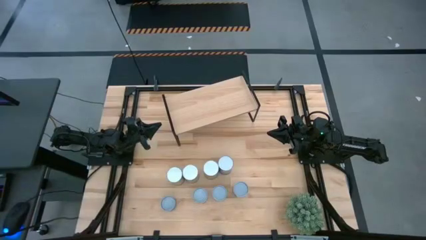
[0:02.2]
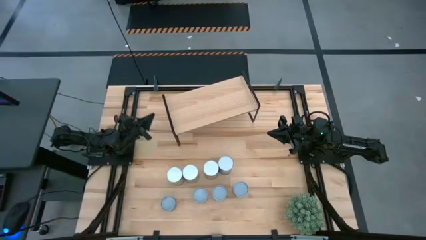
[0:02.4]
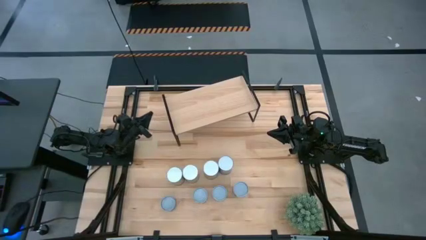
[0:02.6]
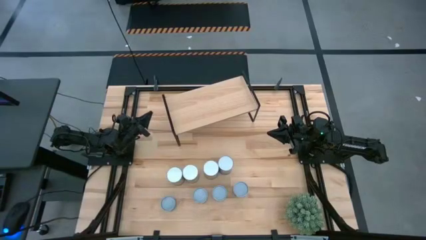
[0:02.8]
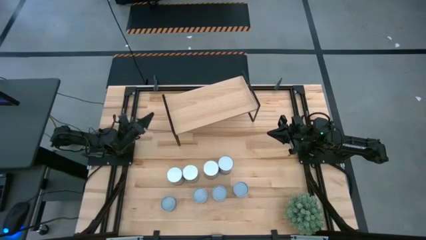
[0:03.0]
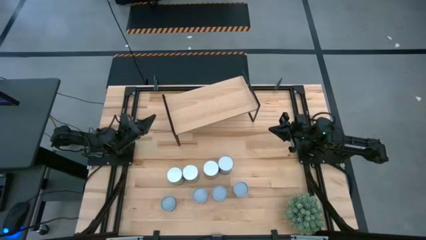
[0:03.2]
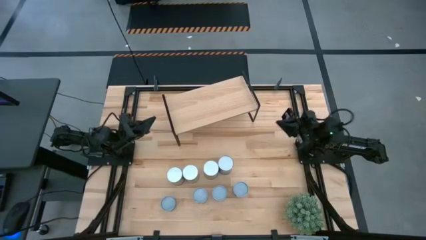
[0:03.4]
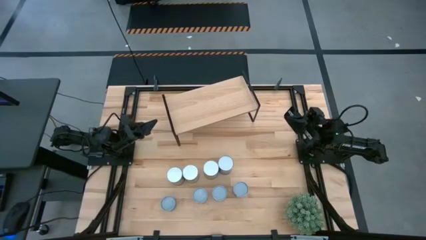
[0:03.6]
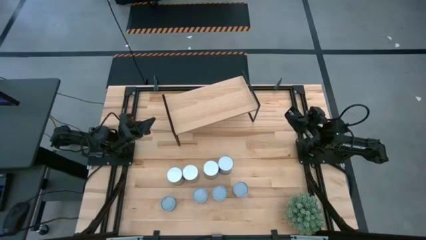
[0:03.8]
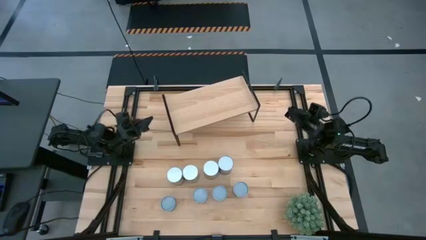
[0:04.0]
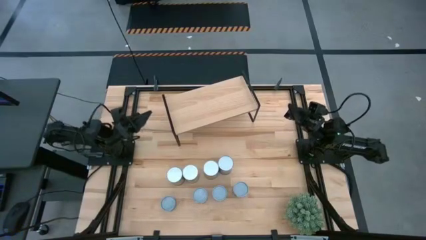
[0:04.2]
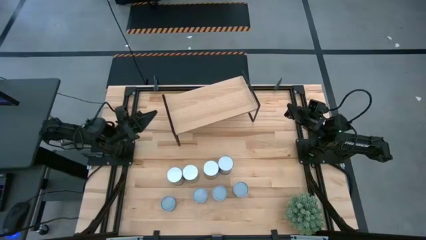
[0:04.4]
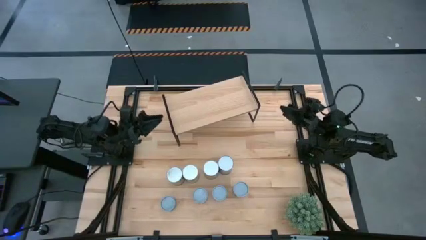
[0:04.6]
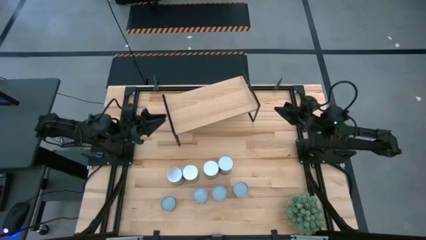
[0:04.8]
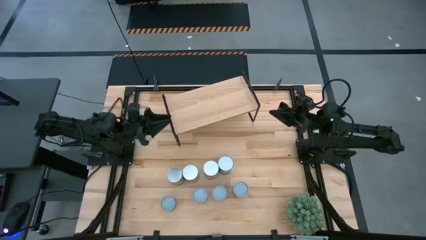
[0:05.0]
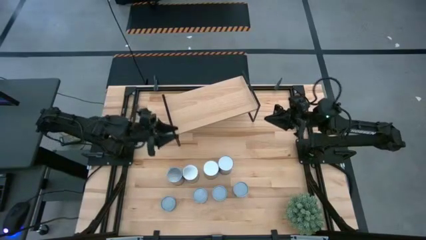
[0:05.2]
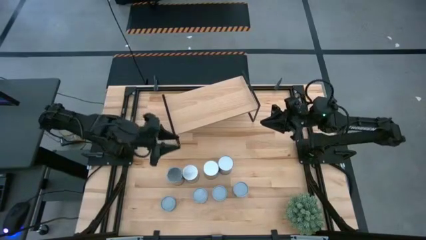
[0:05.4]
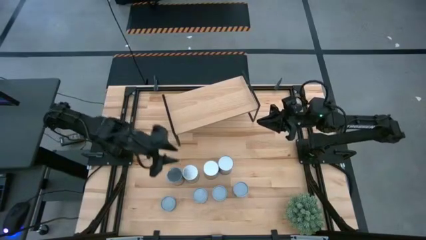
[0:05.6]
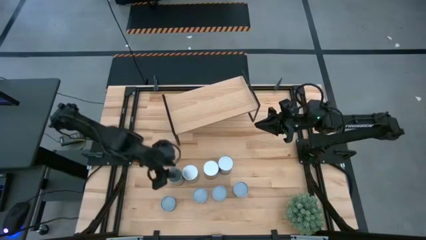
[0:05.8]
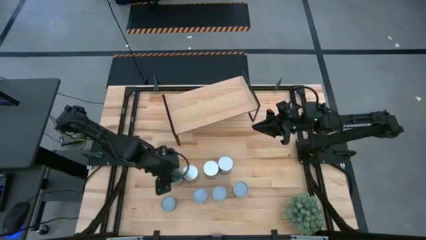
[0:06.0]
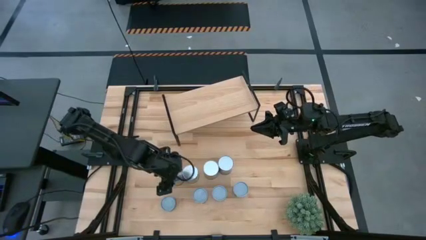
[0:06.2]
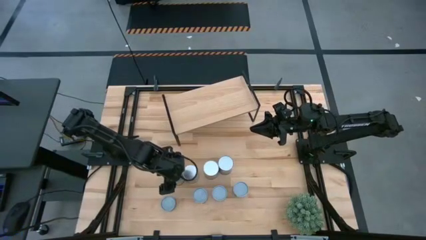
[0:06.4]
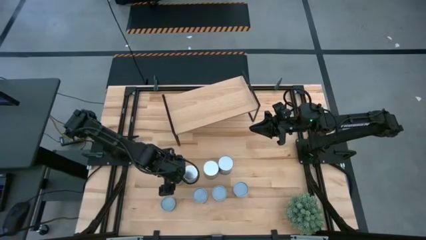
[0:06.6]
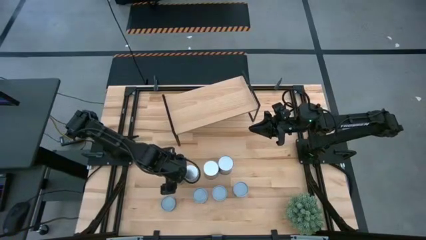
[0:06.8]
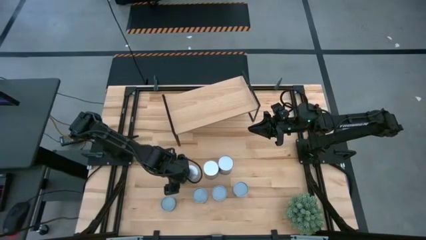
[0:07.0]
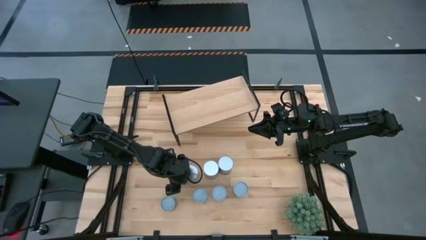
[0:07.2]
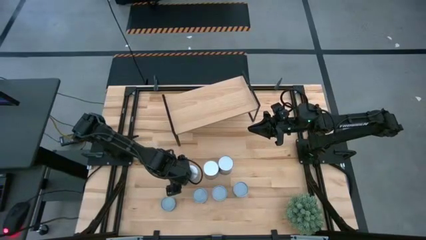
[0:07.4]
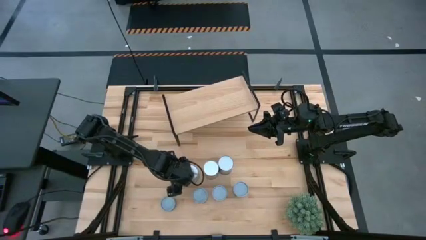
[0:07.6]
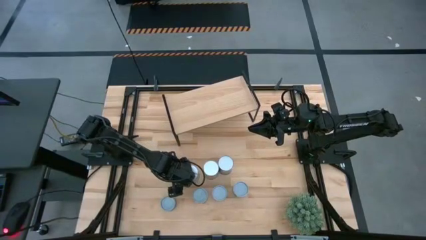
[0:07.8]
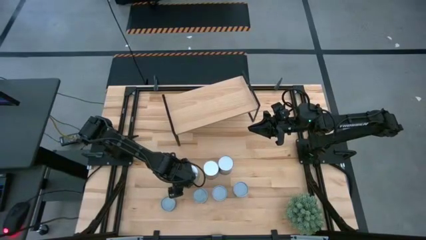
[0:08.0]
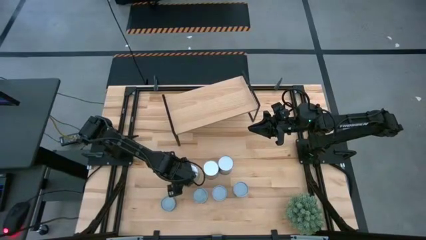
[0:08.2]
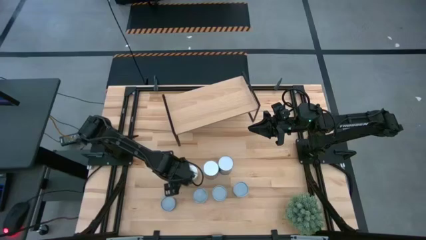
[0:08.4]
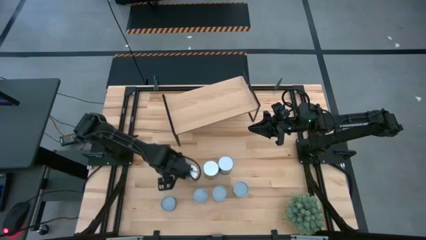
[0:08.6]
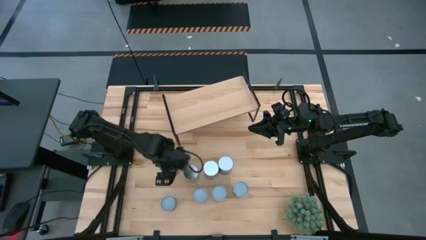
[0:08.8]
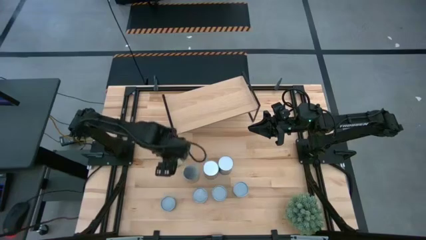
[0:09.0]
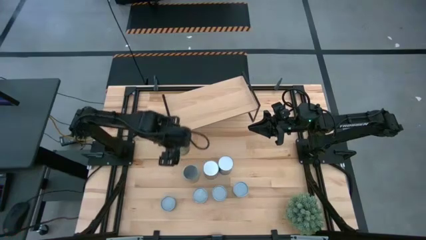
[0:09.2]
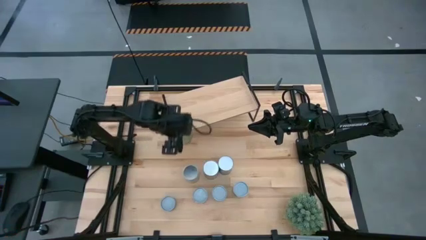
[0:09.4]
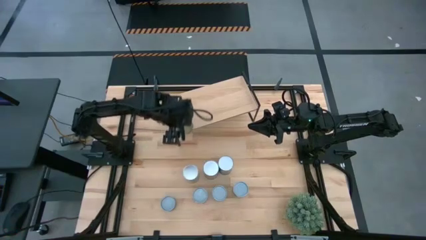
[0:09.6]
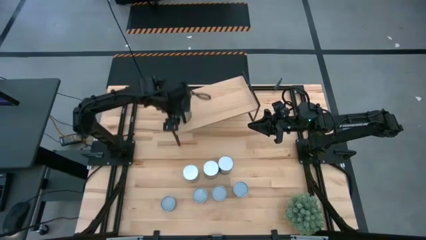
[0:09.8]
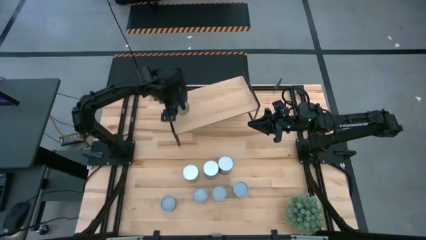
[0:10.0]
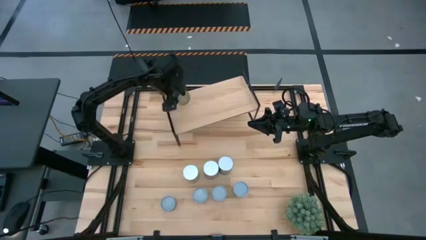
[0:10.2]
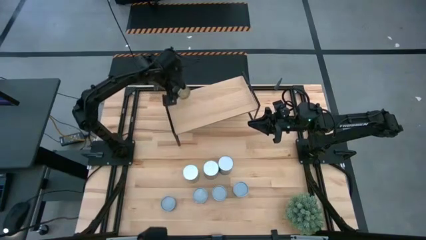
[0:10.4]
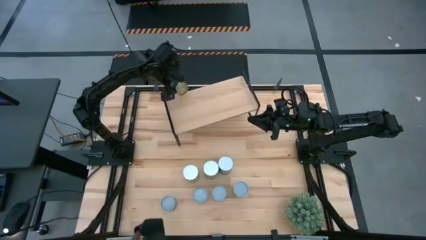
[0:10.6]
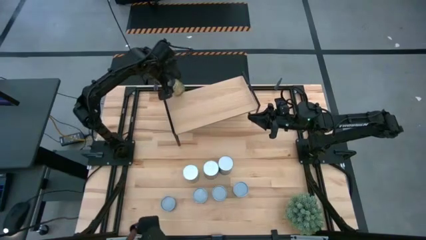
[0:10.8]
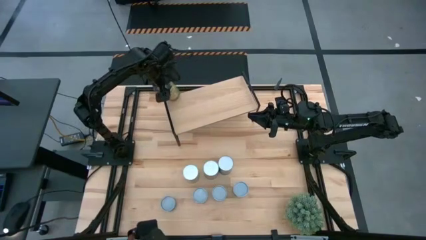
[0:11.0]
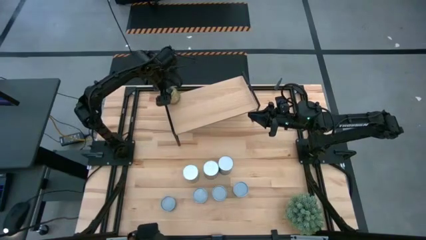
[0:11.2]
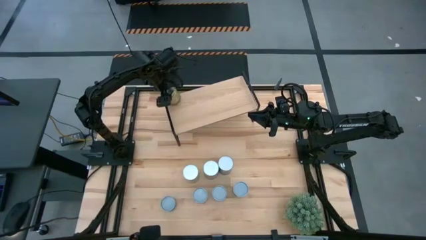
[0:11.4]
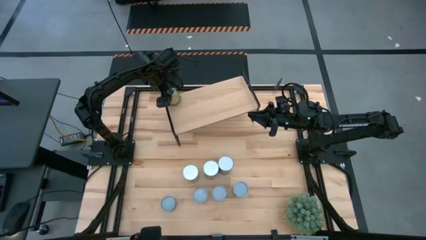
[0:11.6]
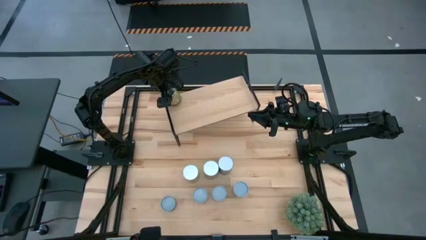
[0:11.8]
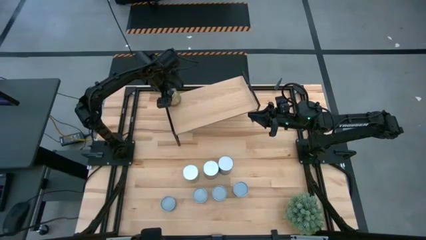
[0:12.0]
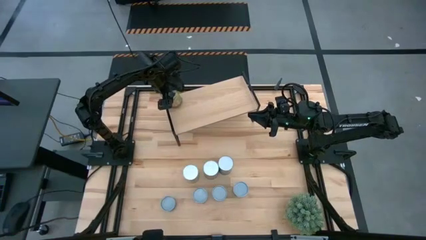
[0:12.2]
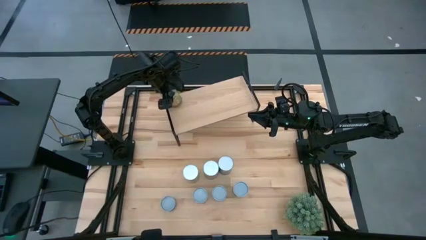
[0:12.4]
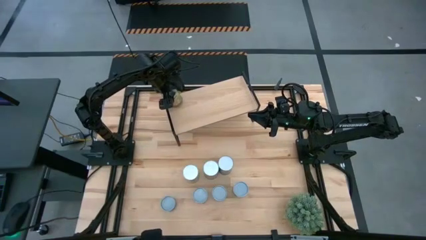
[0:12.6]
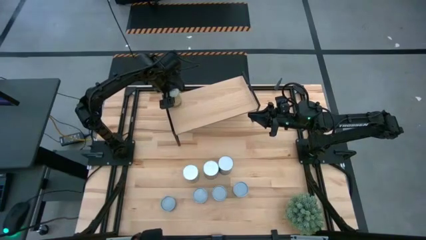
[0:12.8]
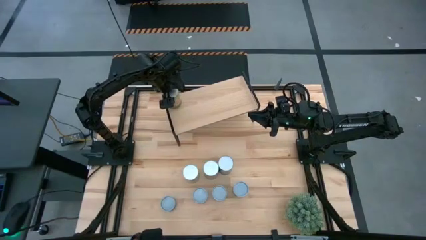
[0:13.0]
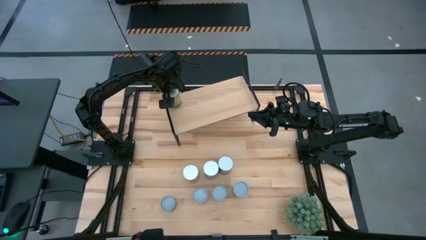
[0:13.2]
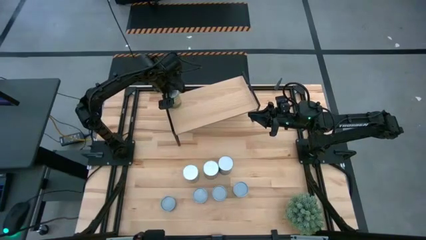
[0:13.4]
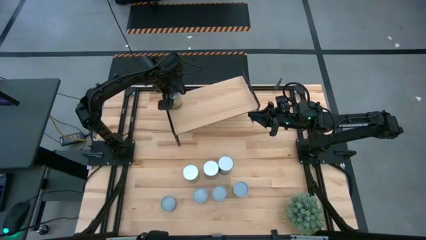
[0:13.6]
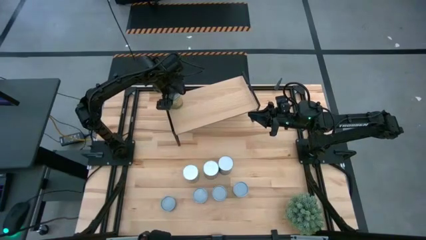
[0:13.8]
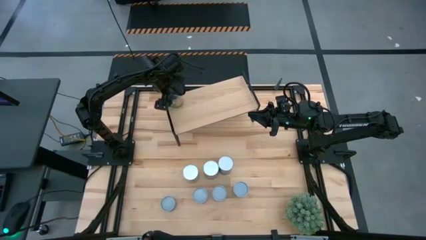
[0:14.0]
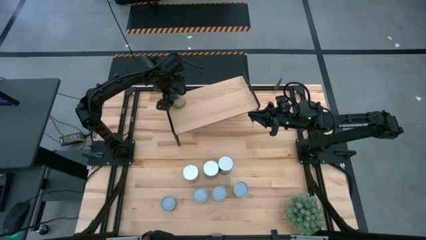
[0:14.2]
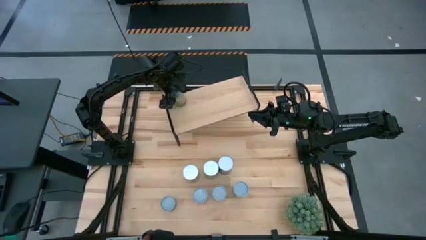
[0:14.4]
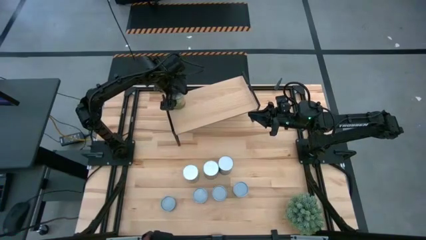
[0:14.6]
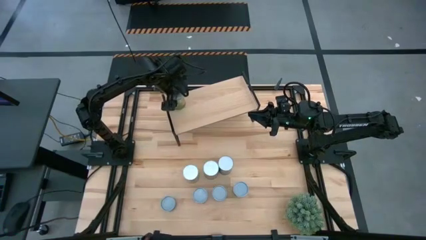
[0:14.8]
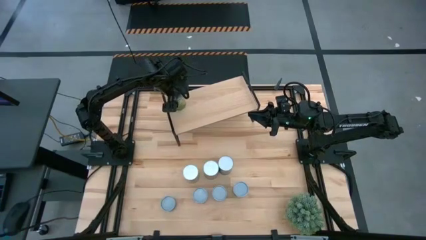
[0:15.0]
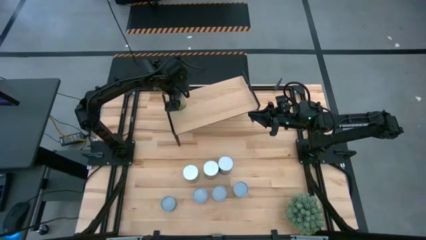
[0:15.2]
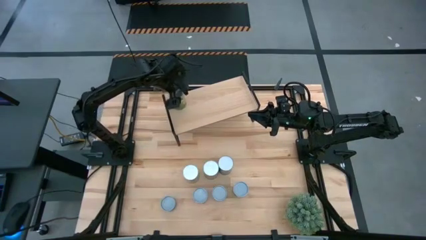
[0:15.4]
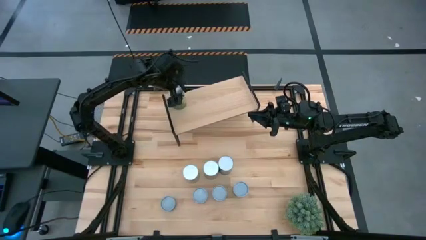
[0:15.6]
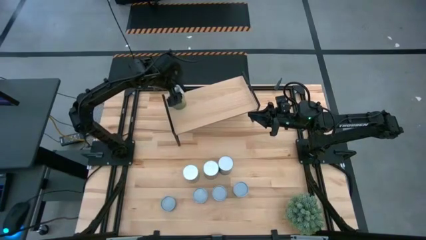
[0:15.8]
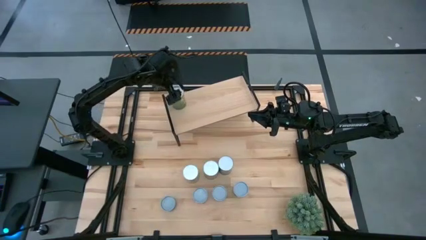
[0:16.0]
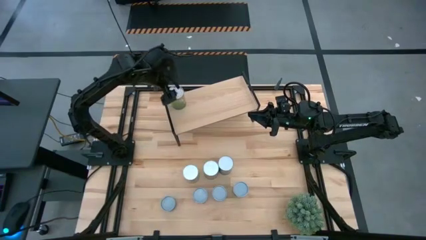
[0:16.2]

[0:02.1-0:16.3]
Task: Pick and place cans onto a shelf
Put the canned oranges on the shelf
